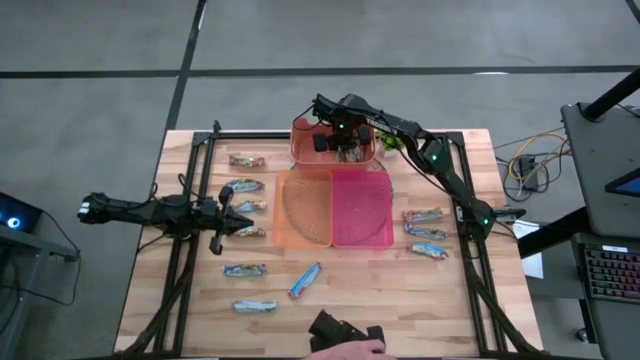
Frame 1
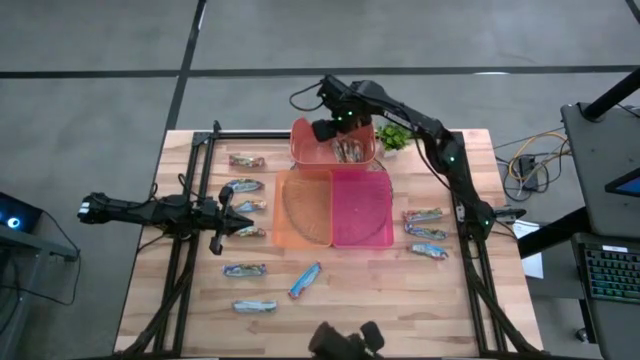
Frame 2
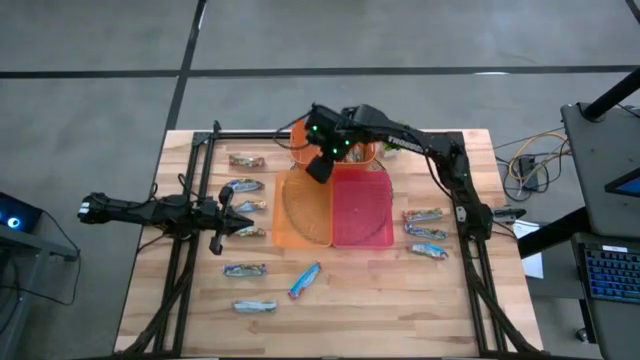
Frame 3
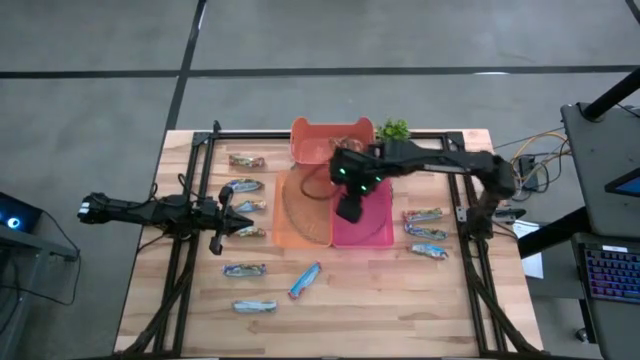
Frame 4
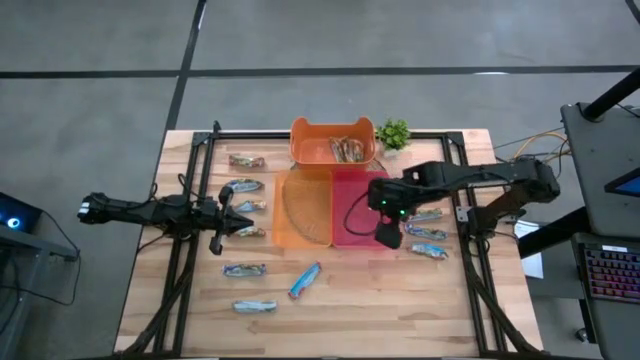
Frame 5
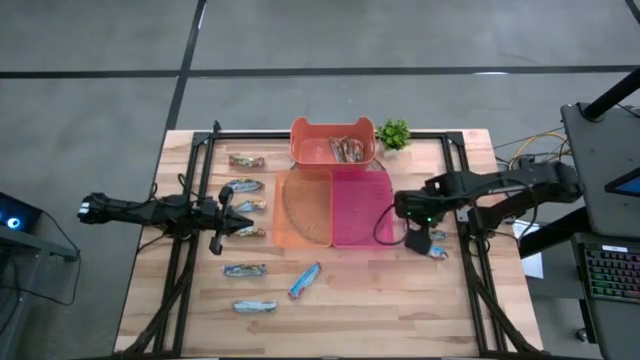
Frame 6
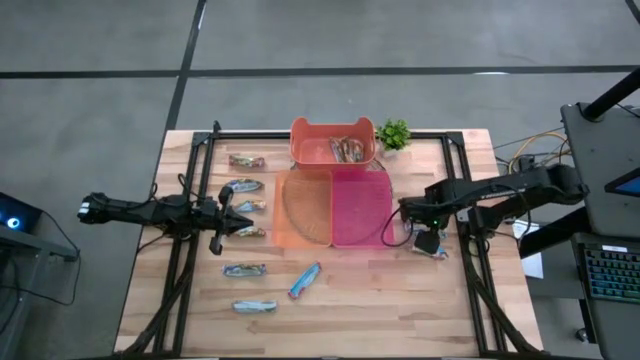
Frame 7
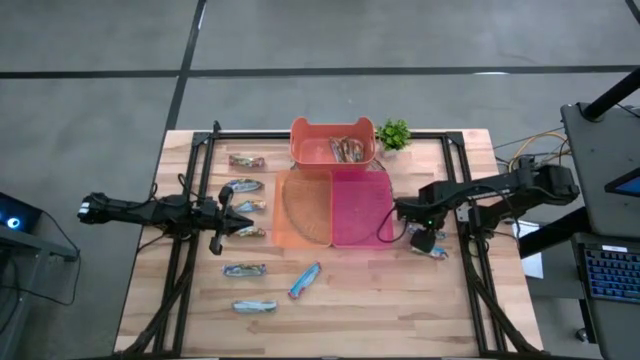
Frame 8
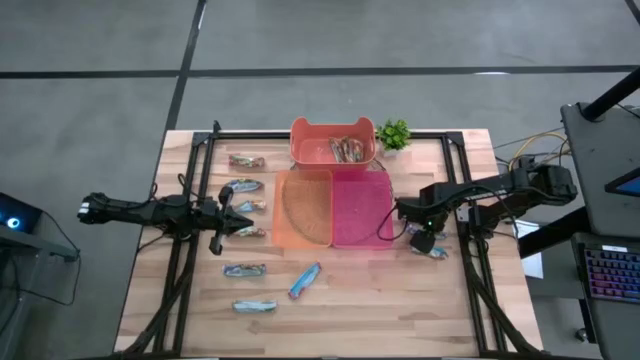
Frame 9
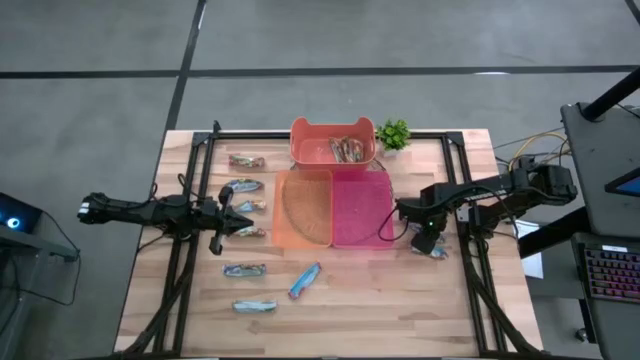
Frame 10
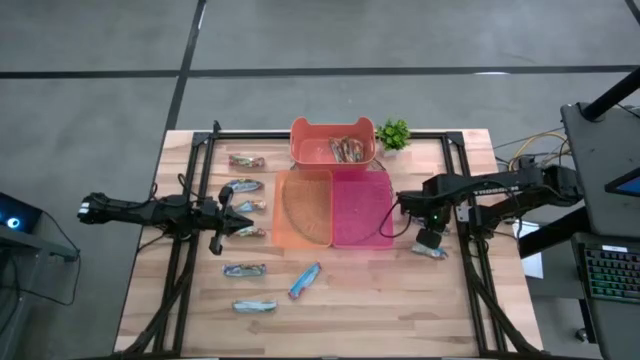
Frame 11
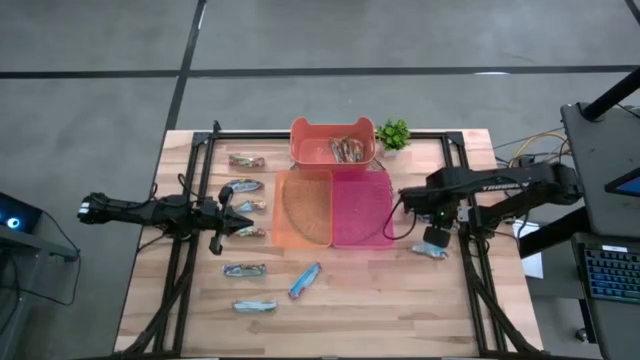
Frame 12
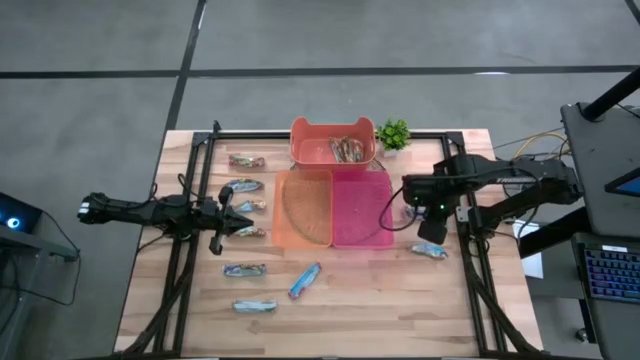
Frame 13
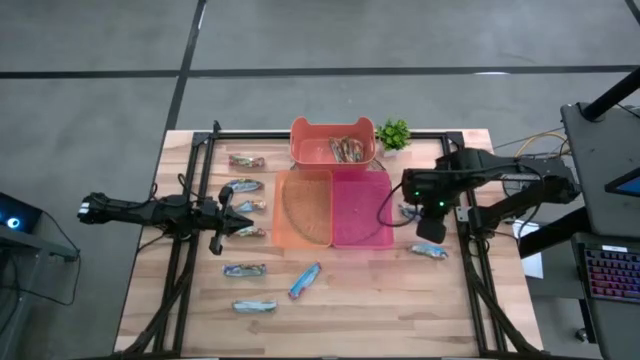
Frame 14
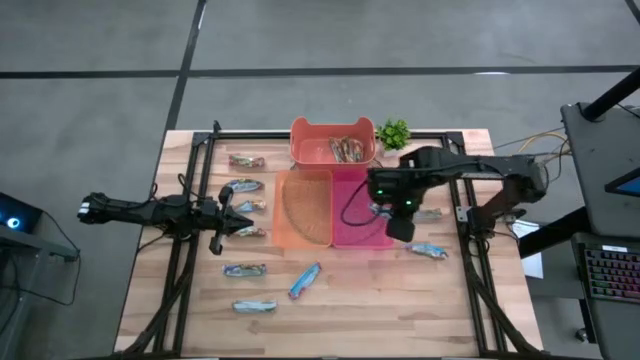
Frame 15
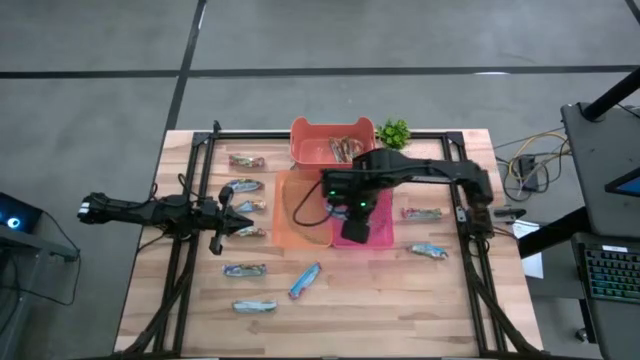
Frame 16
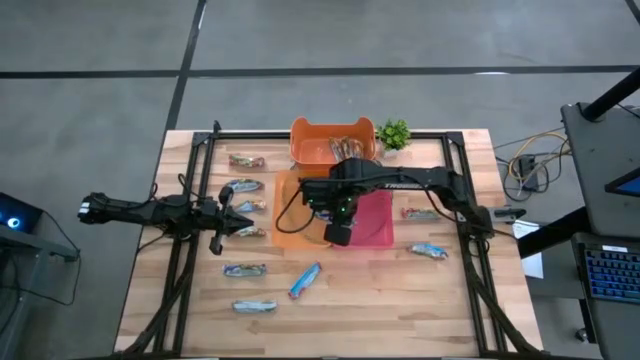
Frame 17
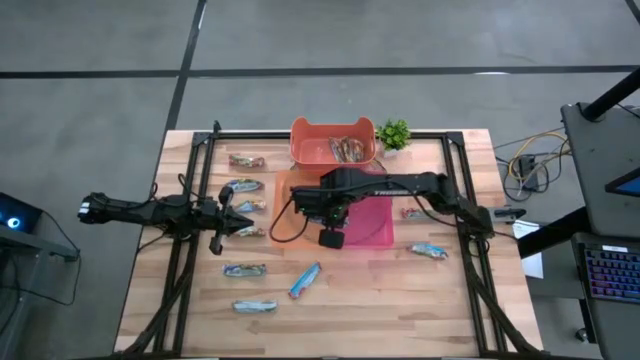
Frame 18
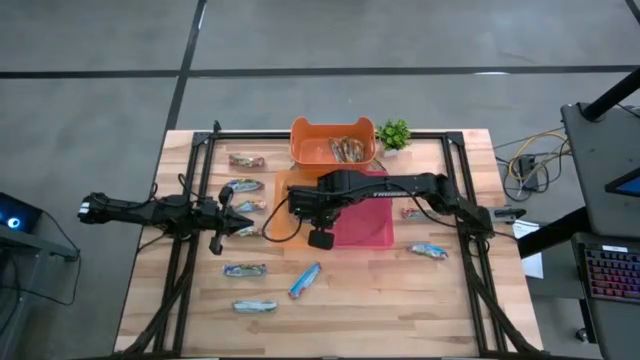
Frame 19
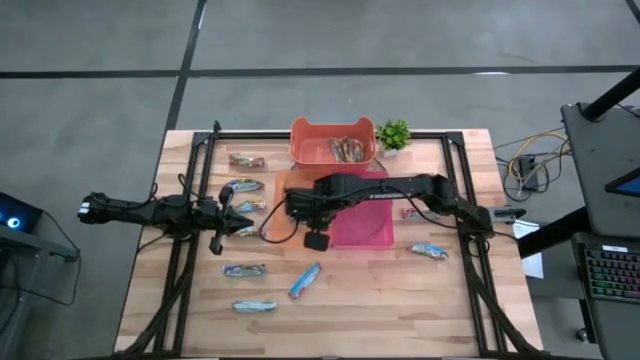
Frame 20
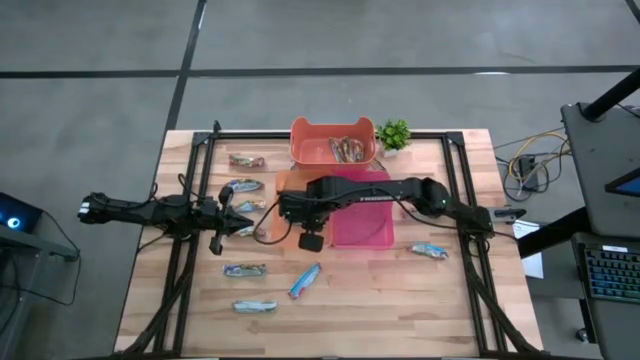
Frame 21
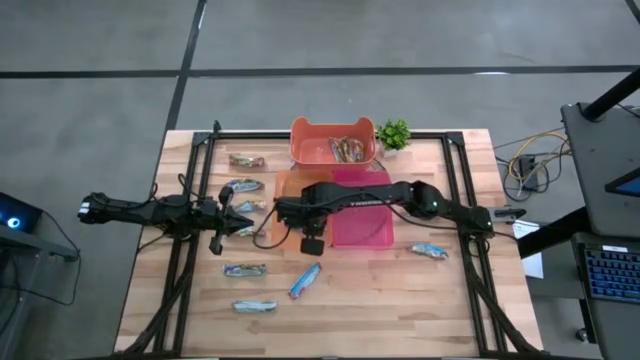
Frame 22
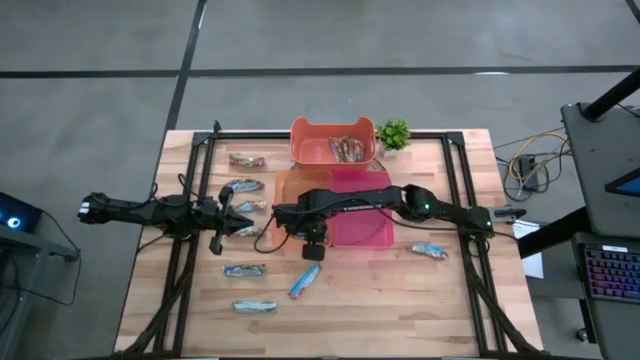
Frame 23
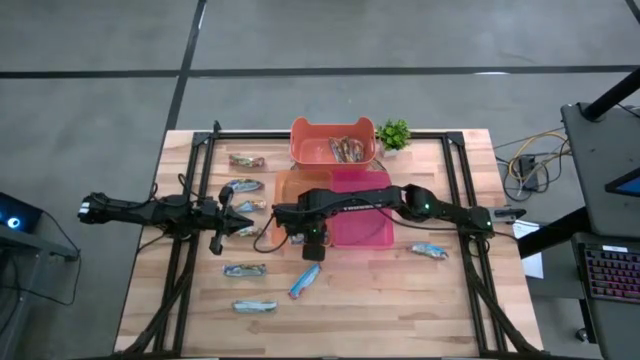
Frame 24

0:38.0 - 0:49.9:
Task: Pick and place Granola Bars by type
Put the blue granola bar into the light orange bin

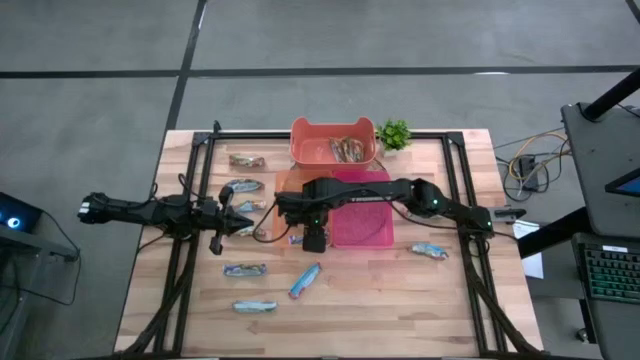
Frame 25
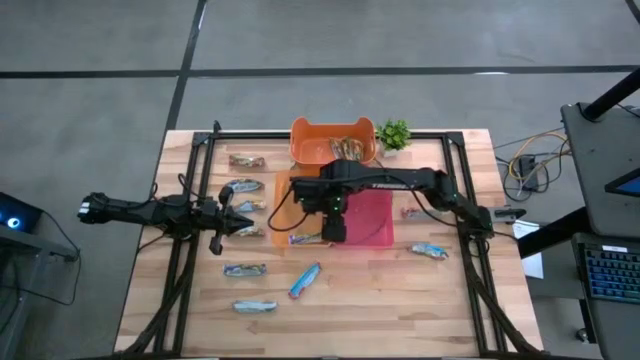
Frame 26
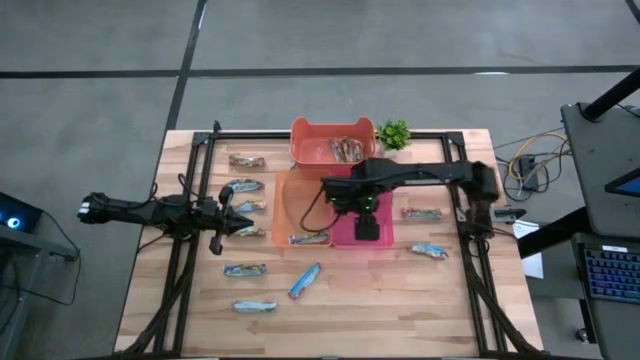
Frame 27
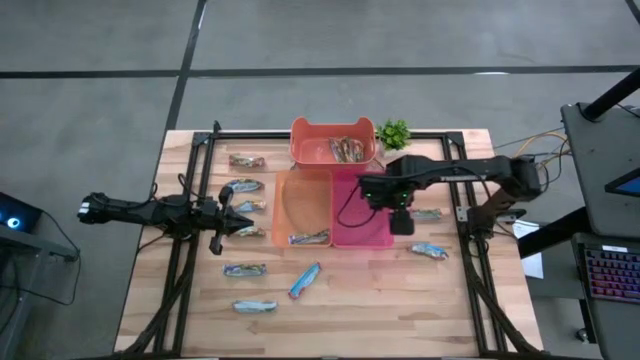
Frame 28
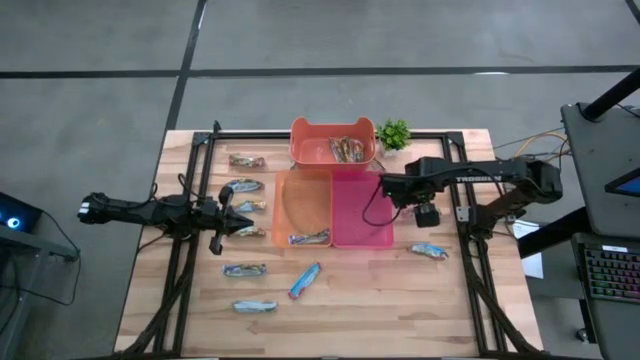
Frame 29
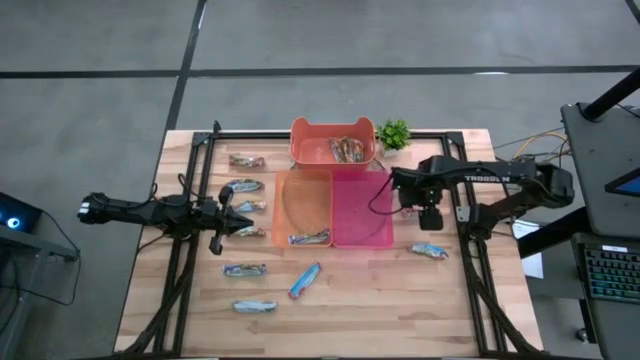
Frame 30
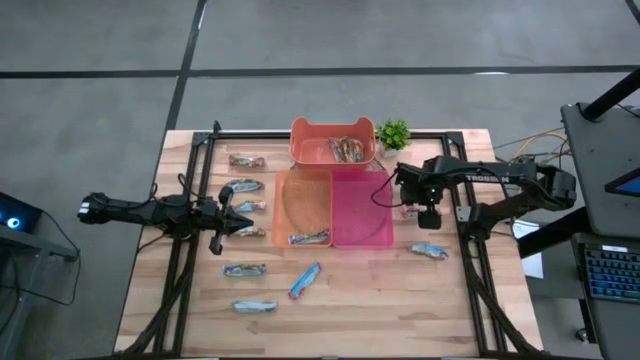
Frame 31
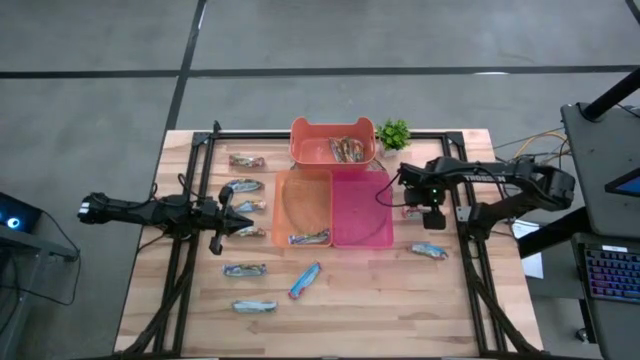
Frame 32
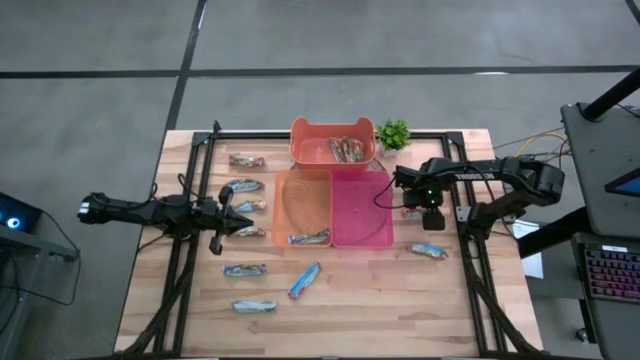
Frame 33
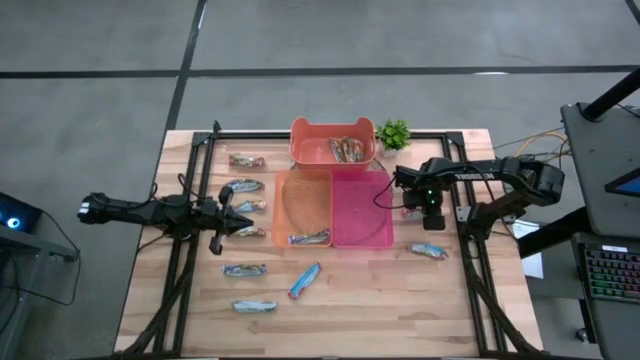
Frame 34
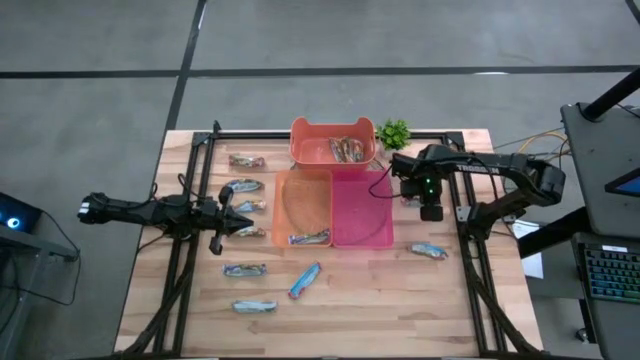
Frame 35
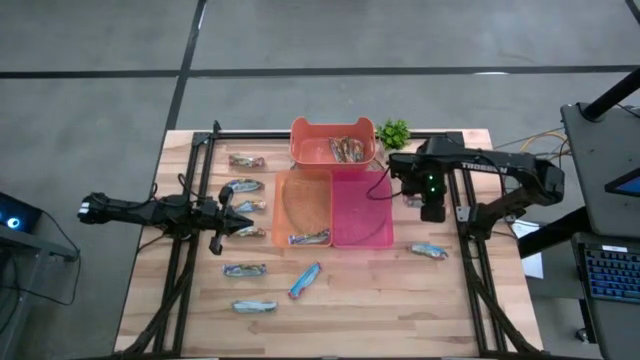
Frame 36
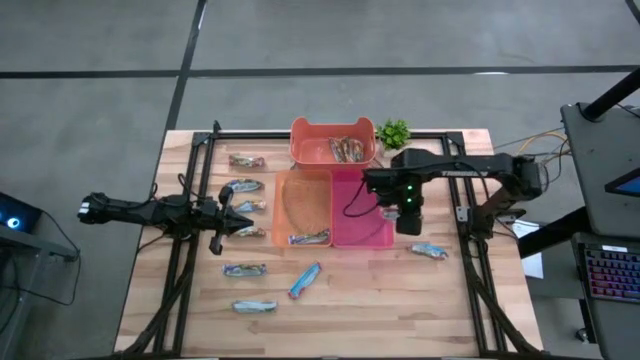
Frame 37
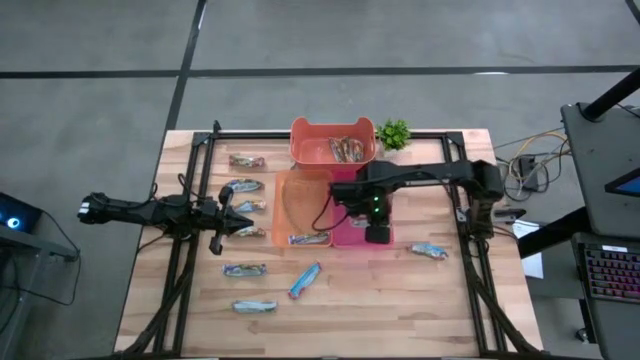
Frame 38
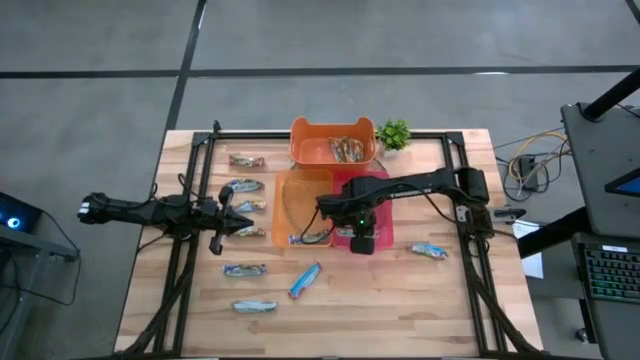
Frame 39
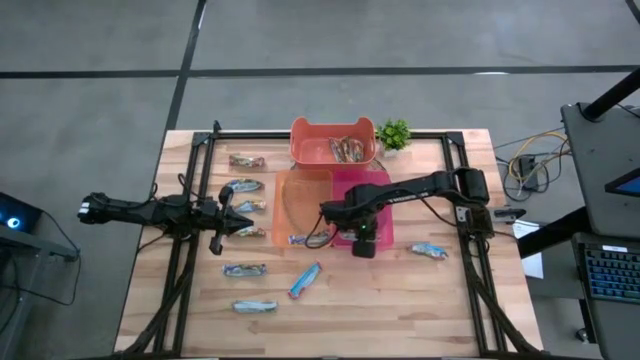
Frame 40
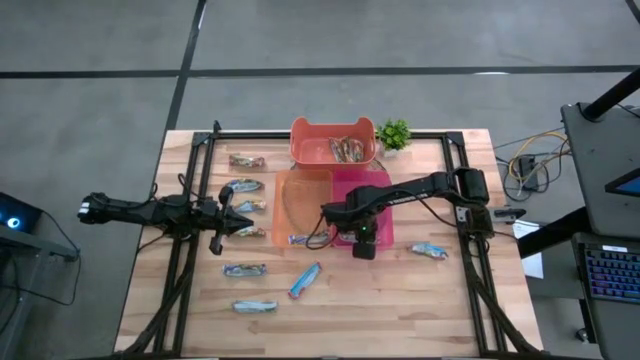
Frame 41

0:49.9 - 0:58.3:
Put the red granola bar into the pink bin

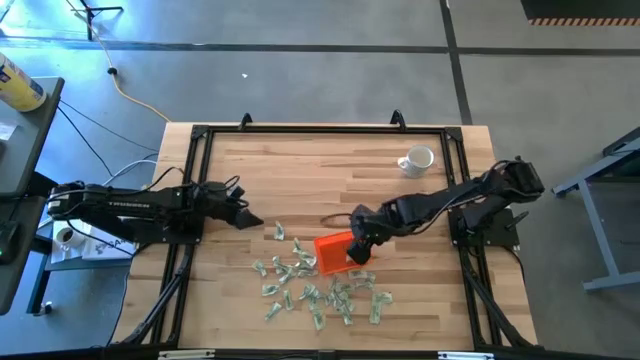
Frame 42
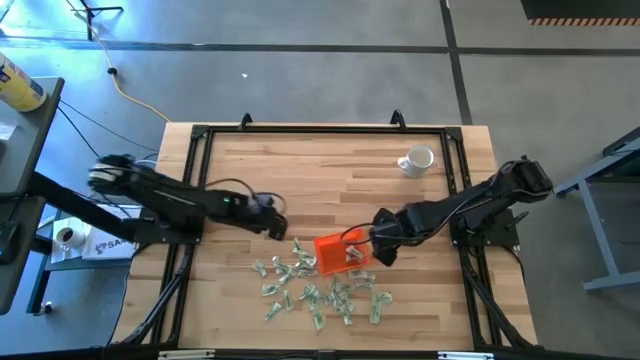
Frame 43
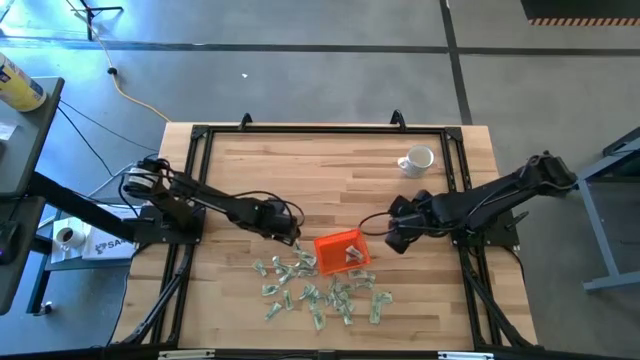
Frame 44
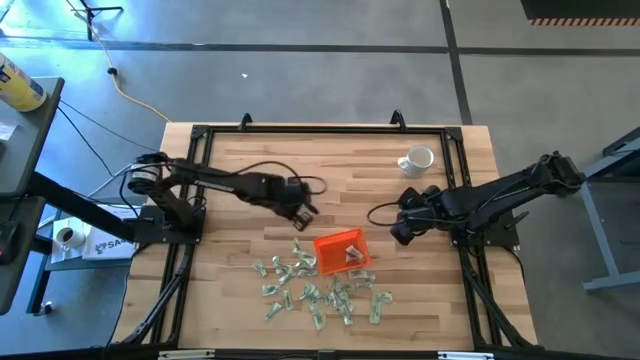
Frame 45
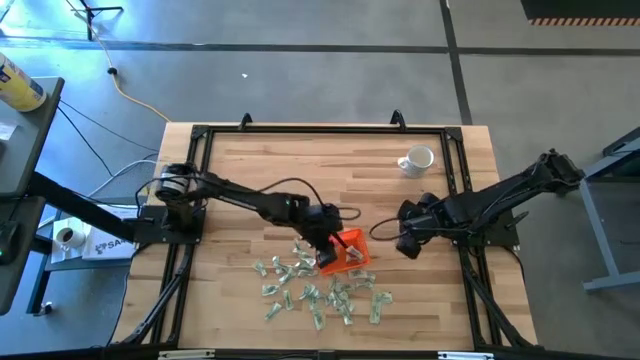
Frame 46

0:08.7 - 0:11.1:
Task: Pick and place Stevia / Truvia into bins
Put the stevia packet into the orange bin
